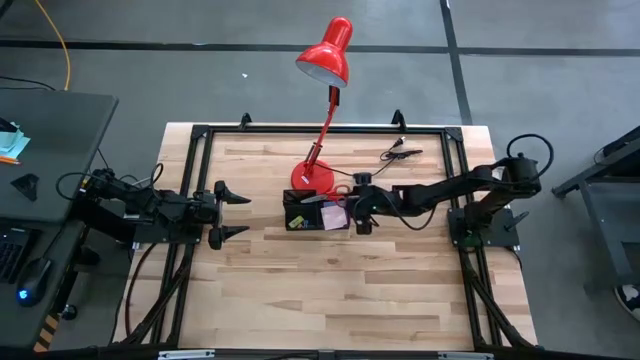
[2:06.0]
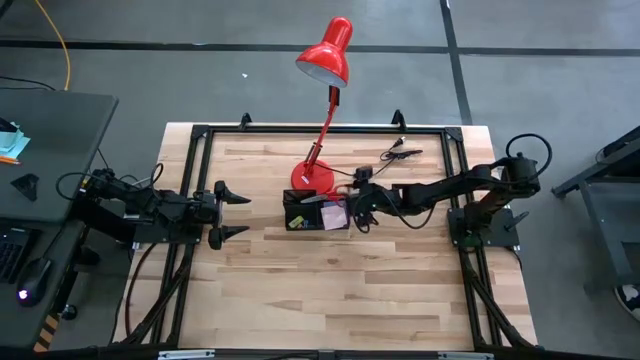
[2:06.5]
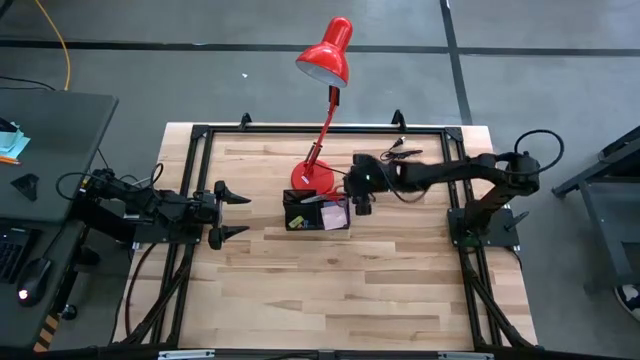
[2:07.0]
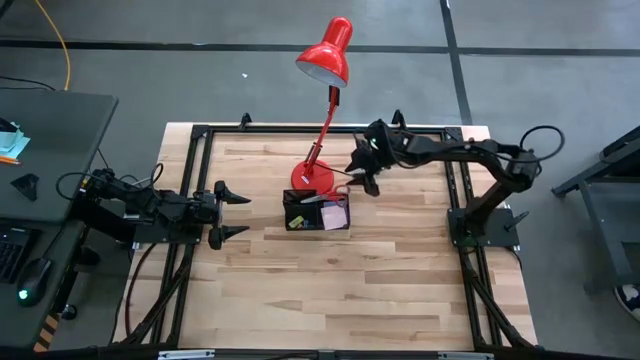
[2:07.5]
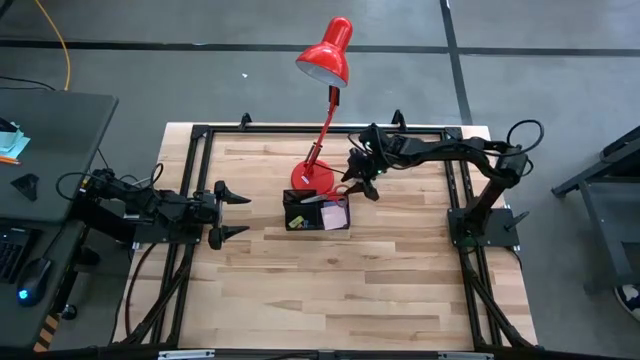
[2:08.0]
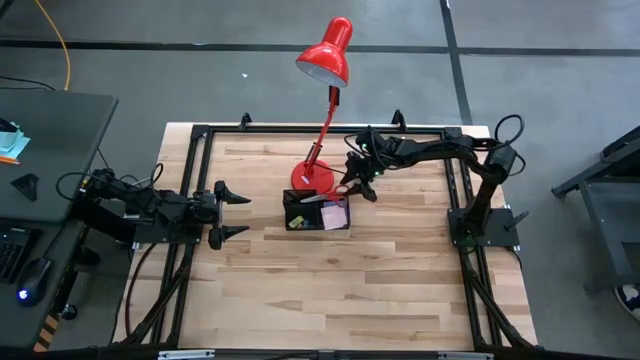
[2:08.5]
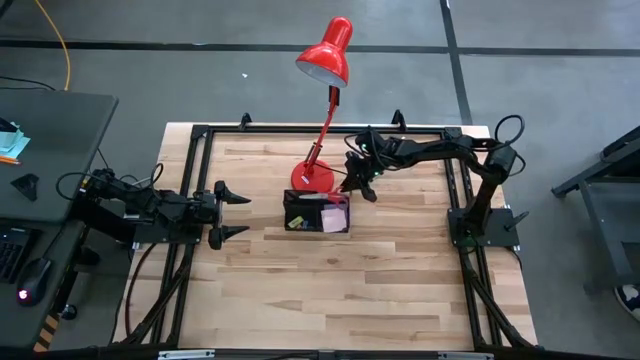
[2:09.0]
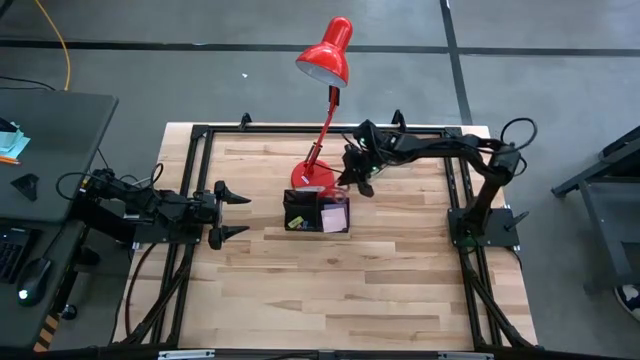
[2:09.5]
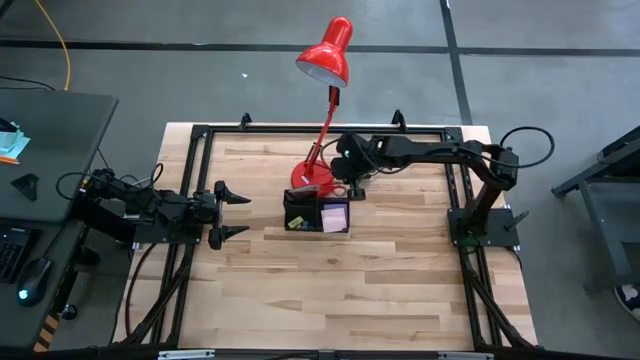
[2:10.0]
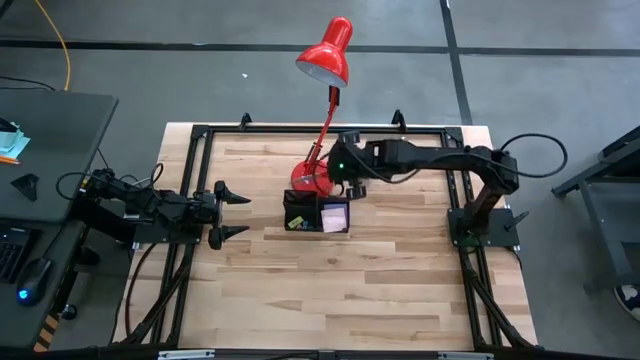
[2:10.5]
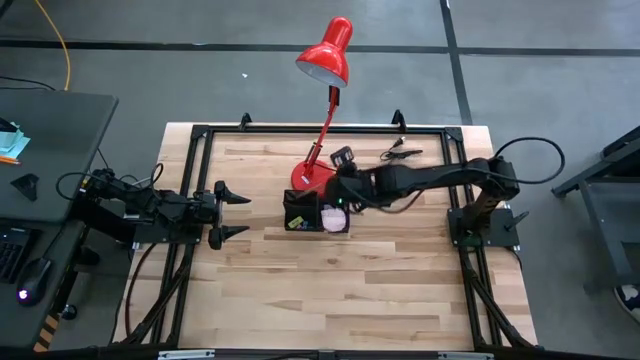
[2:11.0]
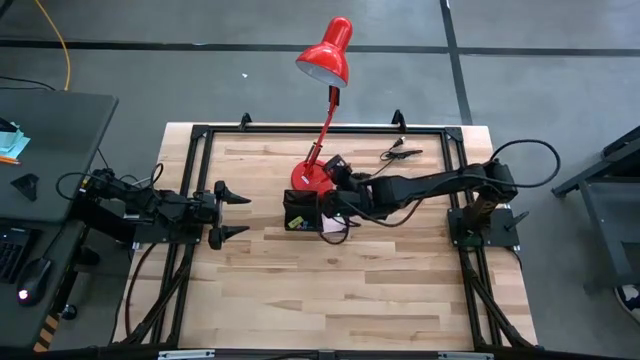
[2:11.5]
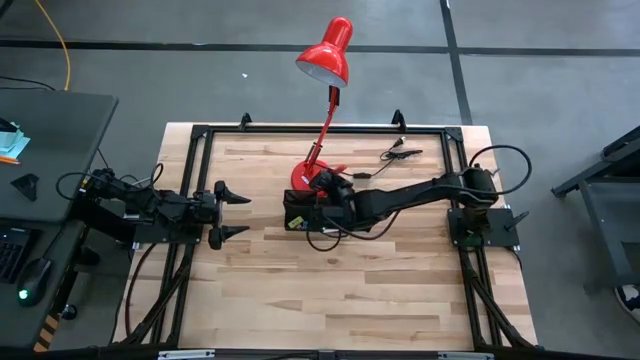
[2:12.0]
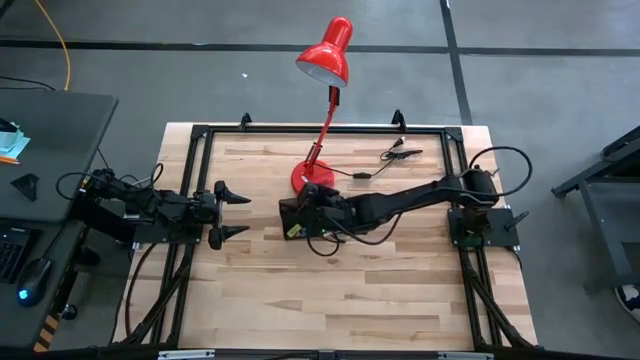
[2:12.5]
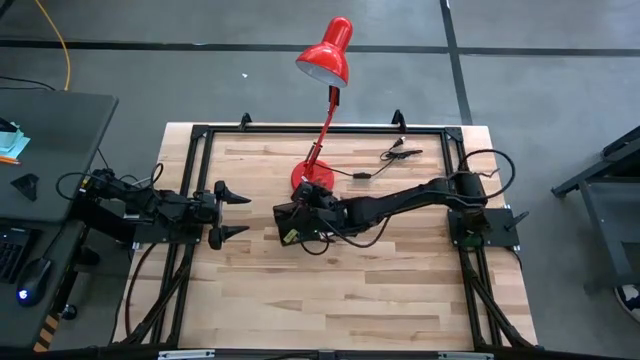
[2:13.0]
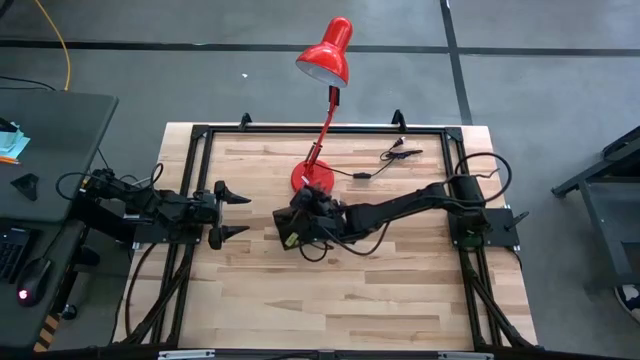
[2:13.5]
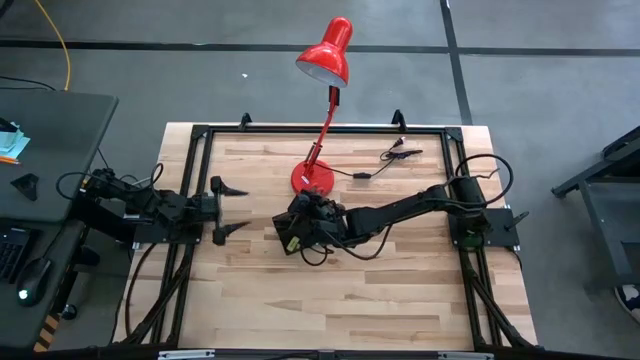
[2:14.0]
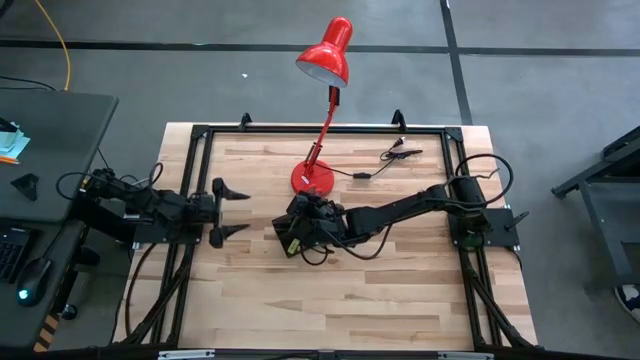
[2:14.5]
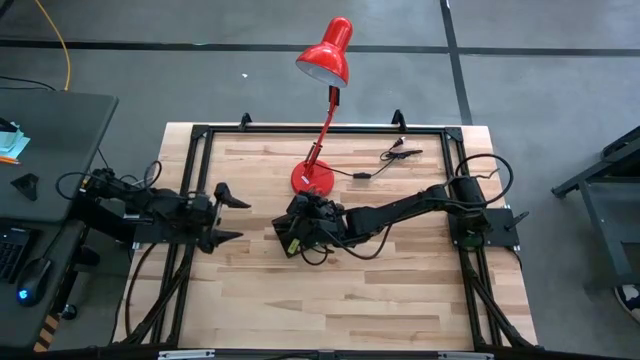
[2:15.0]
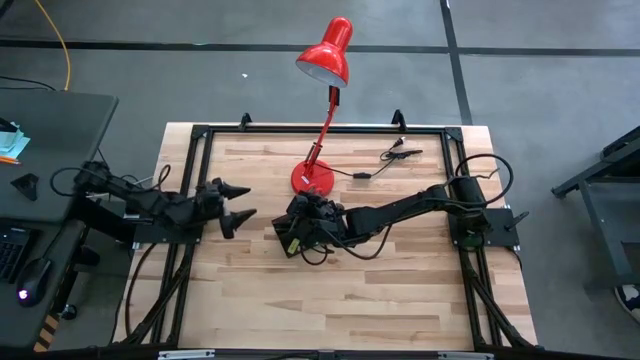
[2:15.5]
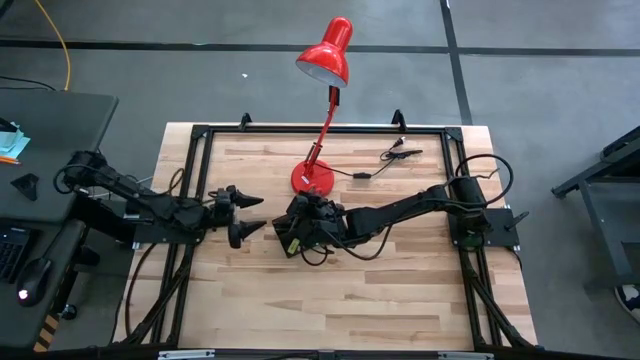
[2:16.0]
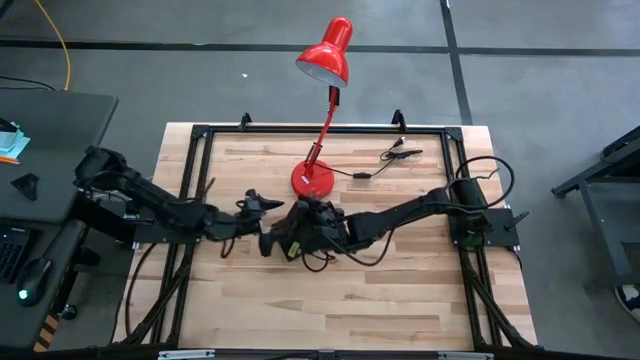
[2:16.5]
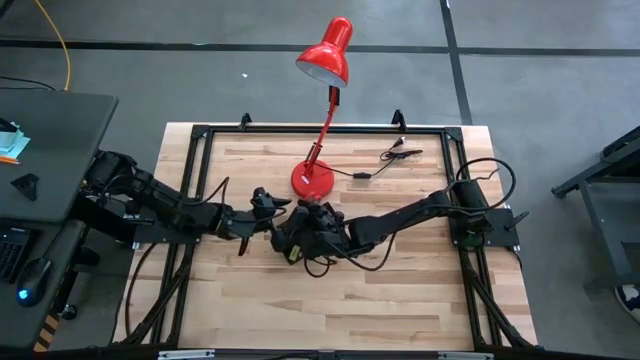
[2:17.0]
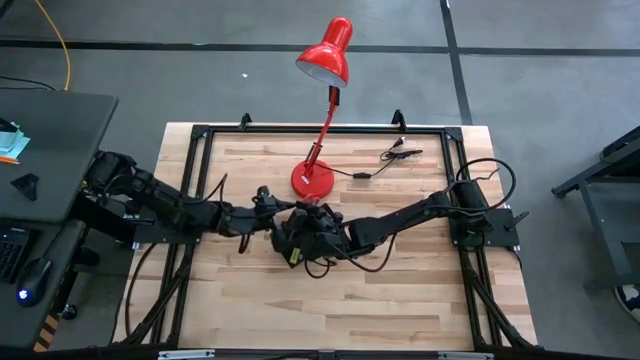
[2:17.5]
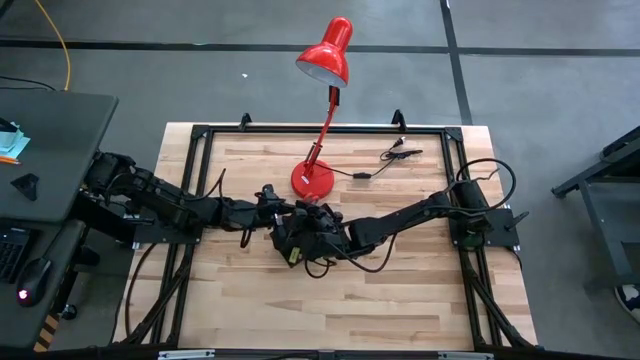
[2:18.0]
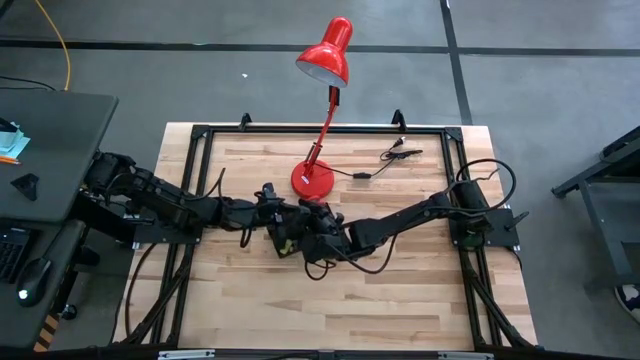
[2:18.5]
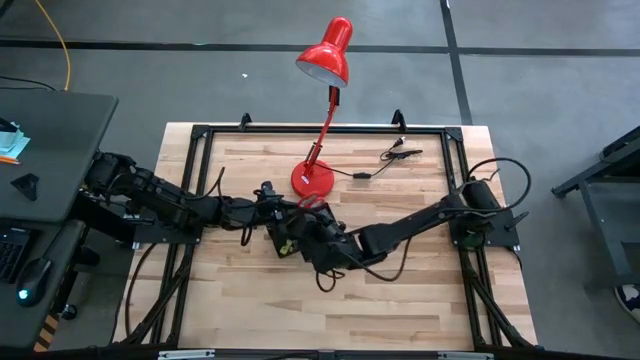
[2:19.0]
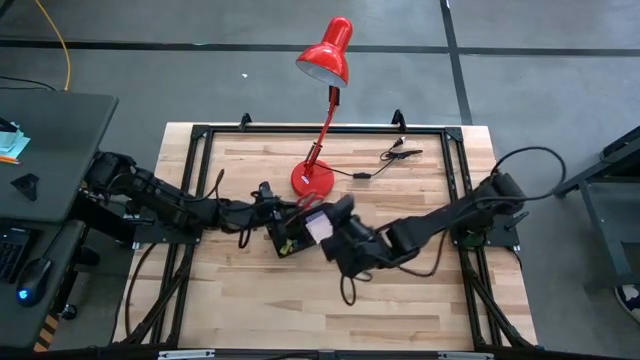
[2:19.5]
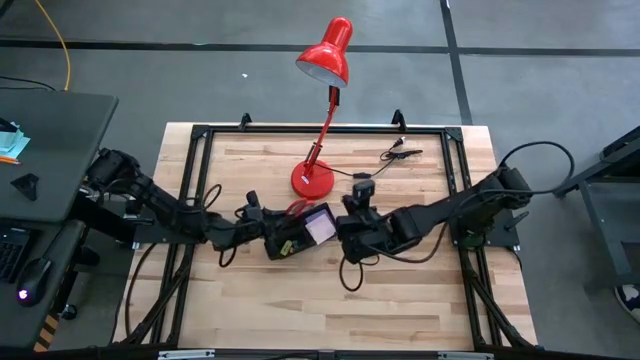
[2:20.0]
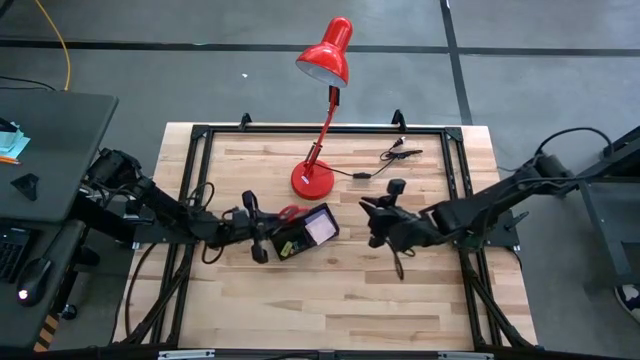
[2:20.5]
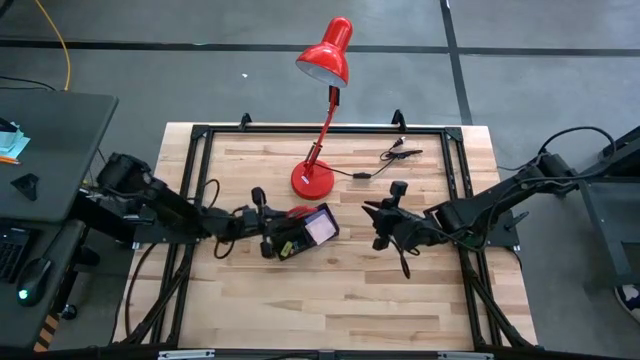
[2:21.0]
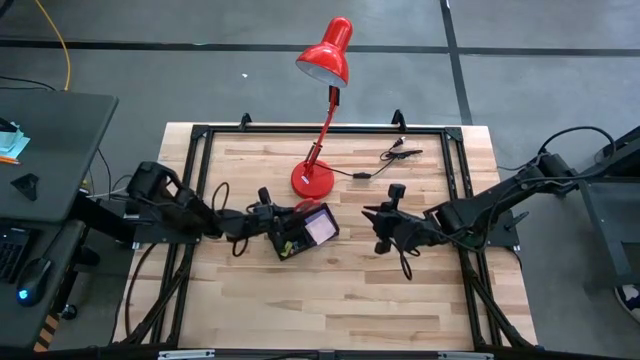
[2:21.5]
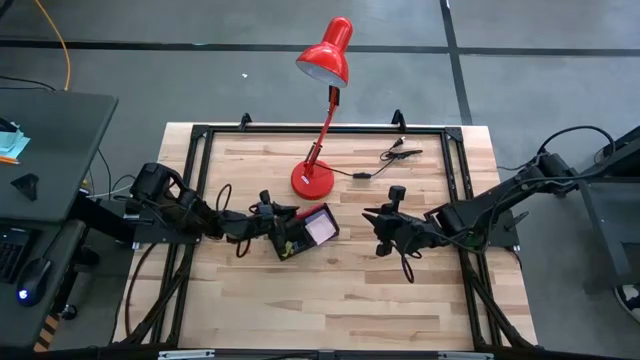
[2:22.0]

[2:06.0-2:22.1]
Task: Pick and place office supplies into organizer
Put the red scissors into the black desk organizer

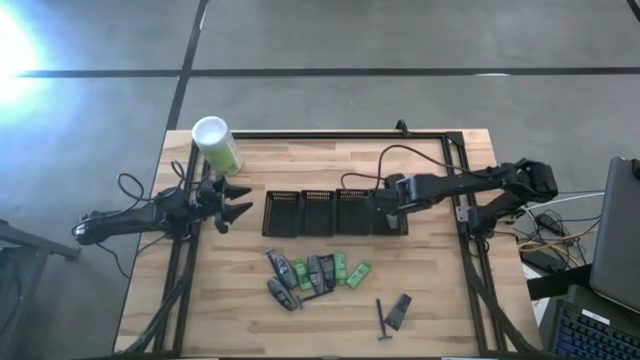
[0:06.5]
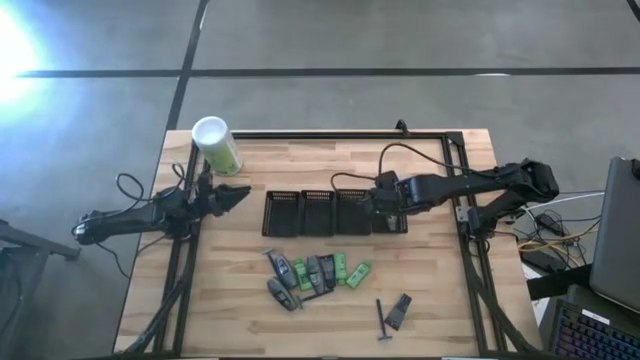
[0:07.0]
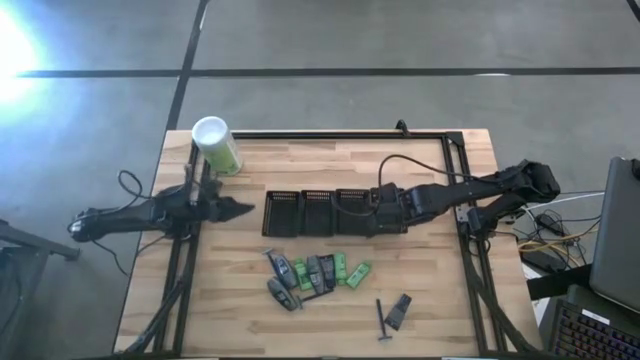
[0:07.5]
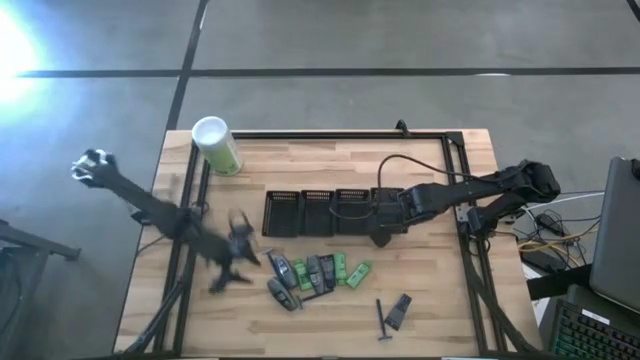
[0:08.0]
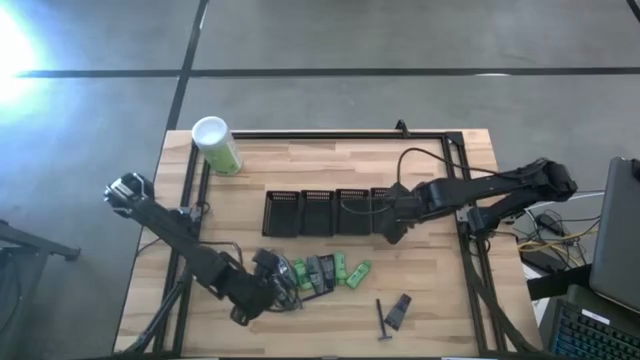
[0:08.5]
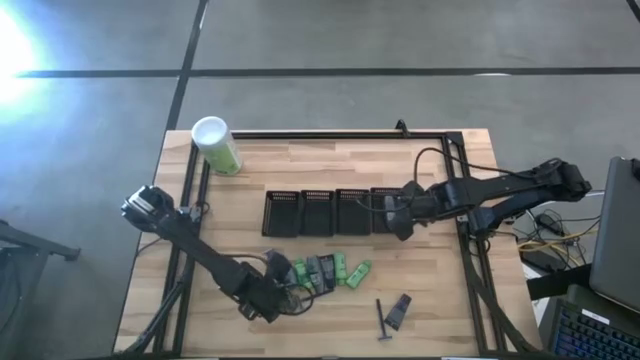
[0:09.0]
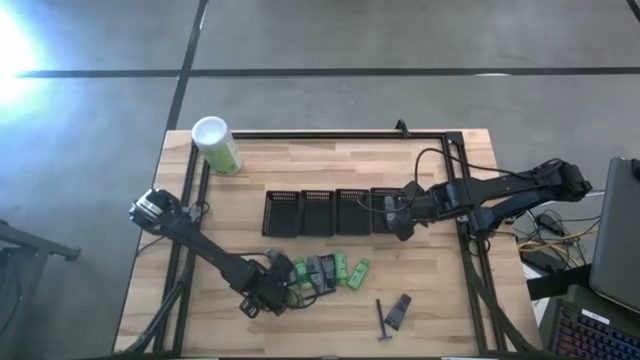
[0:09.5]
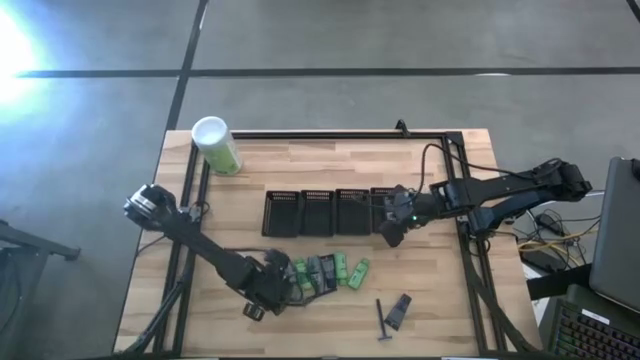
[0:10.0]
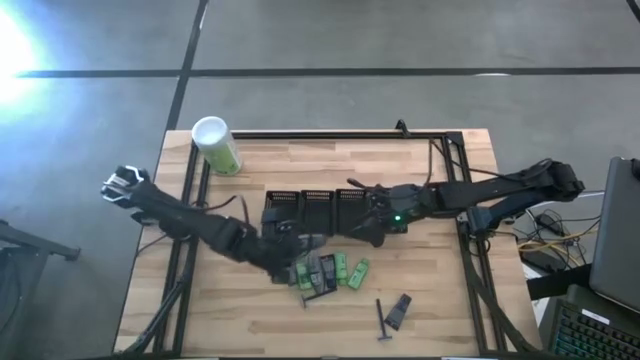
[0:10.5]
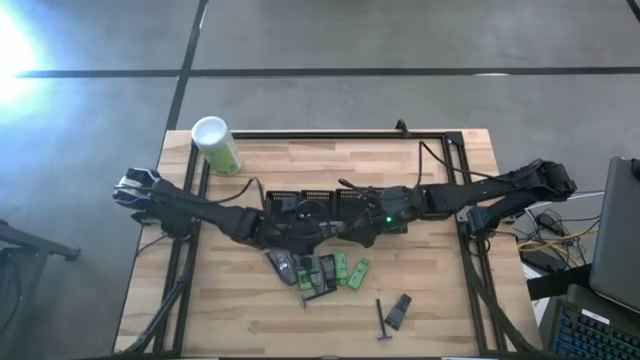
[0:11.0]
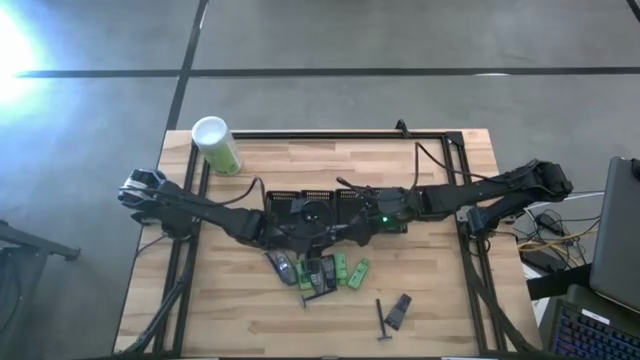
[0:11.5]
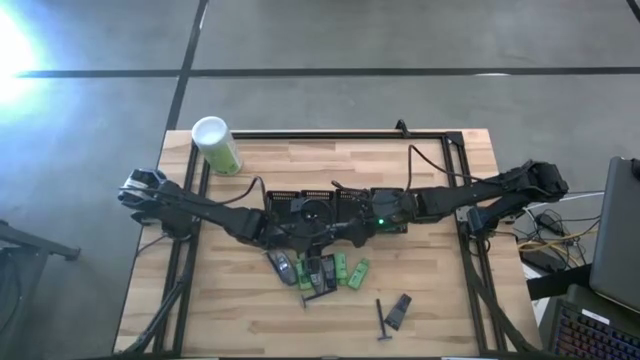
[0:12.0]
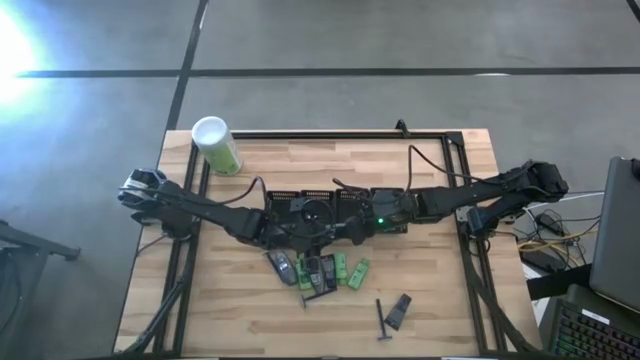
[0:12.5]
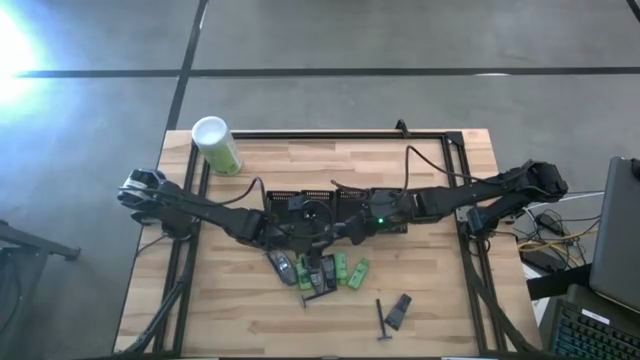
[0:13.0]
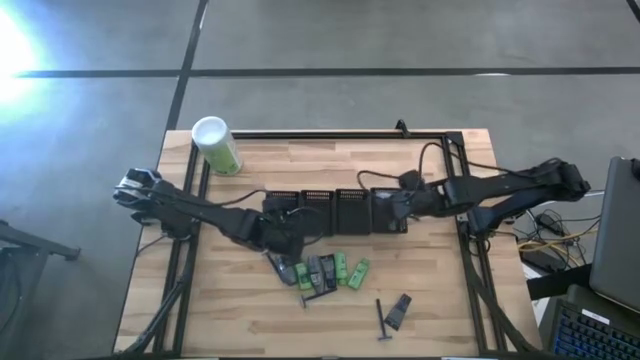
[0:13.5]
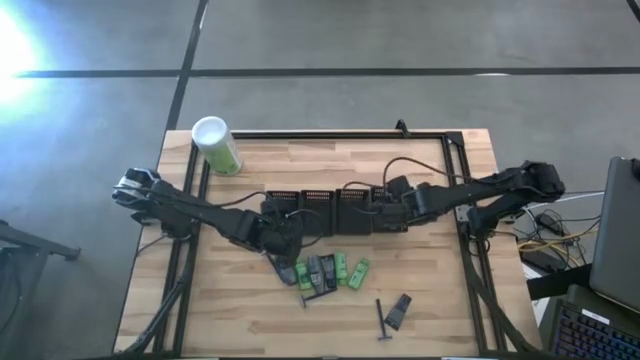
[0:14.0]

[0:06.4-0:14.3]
Task: Pick & Place Travel size toiletries
Put the gray deodorant into the right black basket
